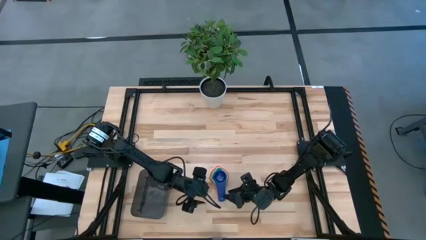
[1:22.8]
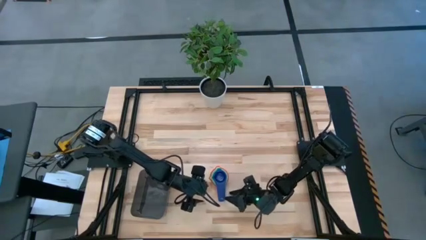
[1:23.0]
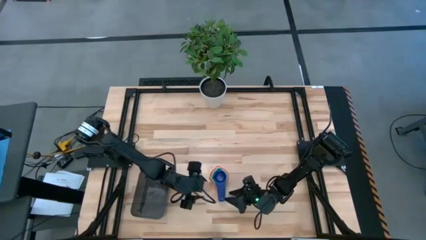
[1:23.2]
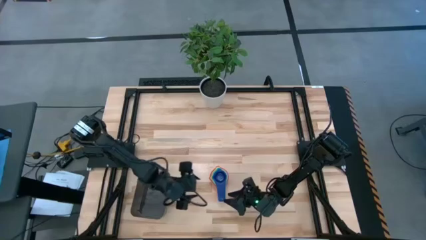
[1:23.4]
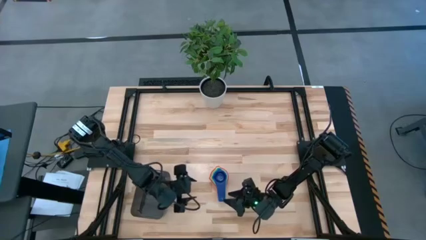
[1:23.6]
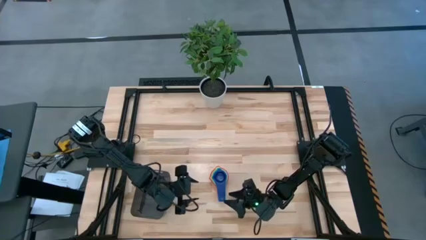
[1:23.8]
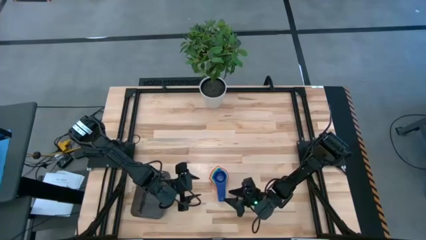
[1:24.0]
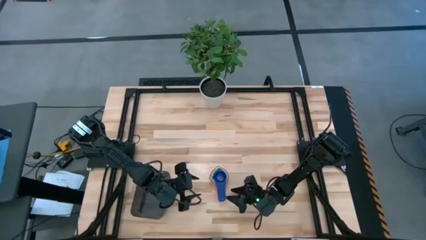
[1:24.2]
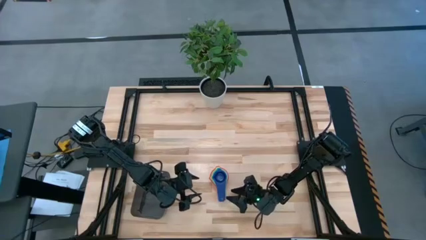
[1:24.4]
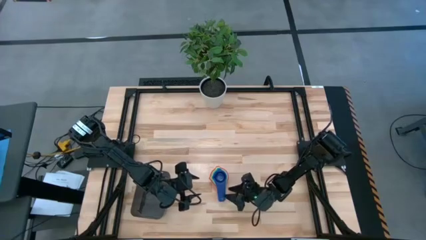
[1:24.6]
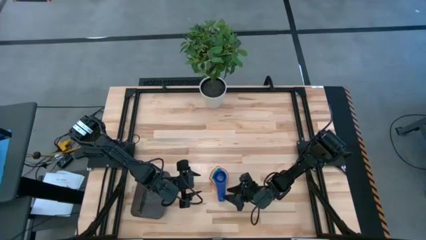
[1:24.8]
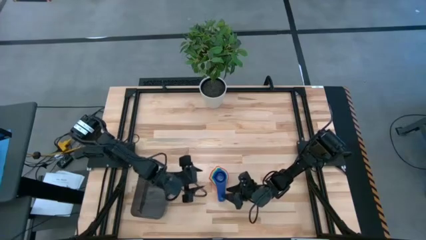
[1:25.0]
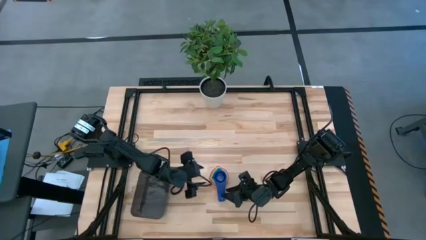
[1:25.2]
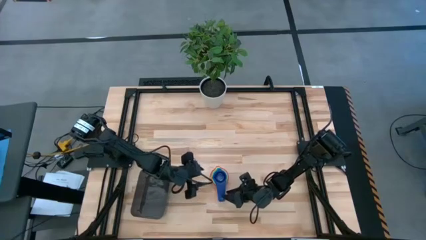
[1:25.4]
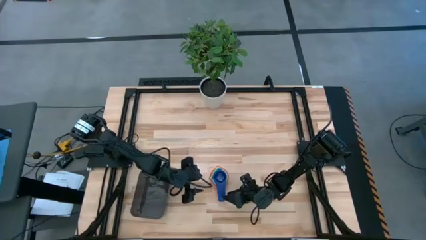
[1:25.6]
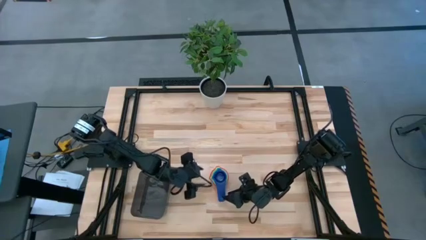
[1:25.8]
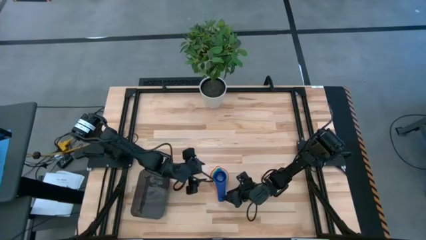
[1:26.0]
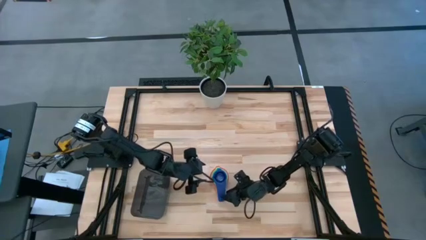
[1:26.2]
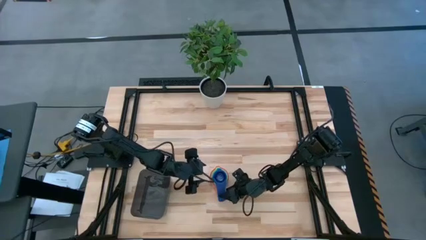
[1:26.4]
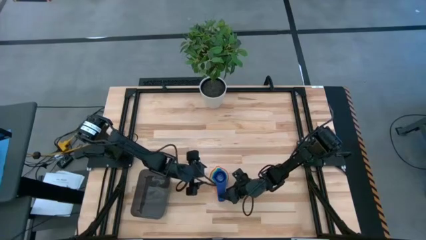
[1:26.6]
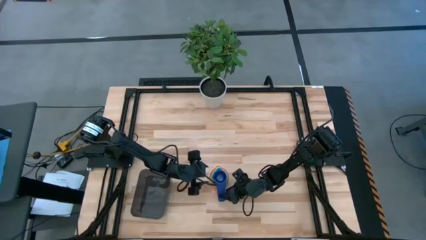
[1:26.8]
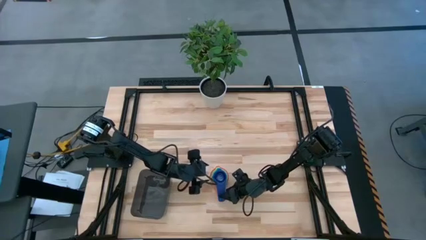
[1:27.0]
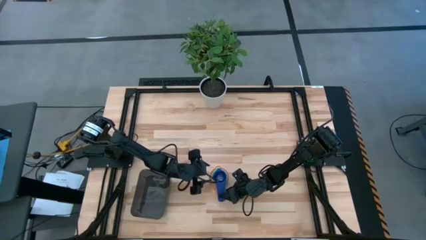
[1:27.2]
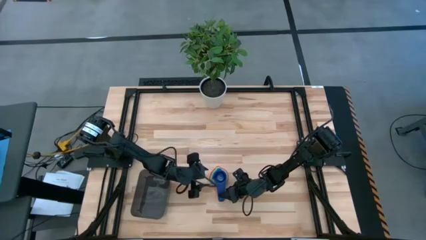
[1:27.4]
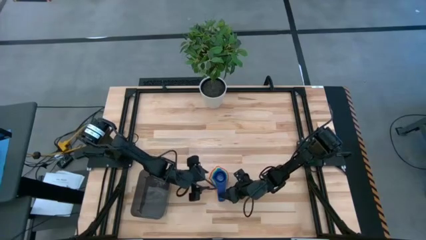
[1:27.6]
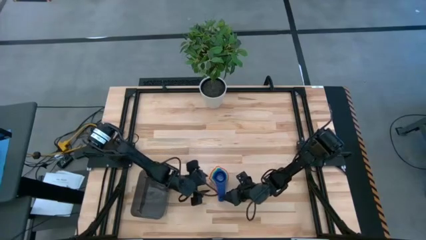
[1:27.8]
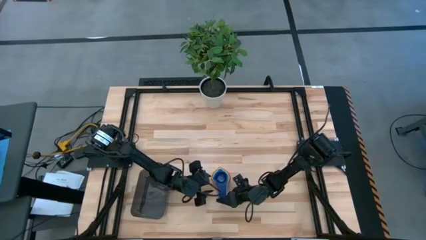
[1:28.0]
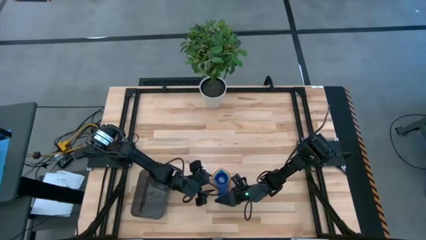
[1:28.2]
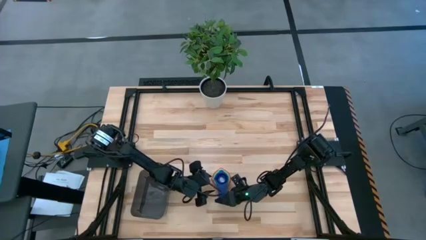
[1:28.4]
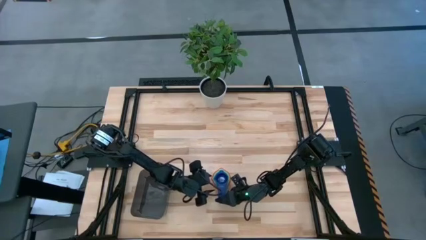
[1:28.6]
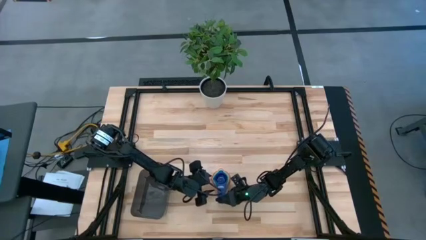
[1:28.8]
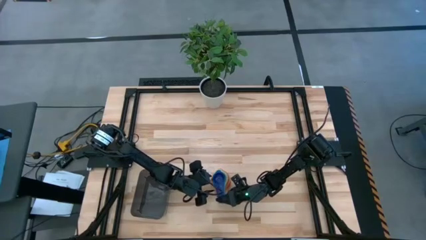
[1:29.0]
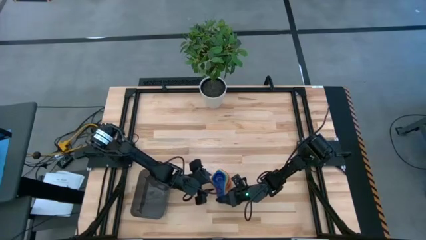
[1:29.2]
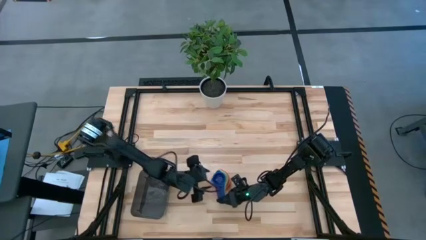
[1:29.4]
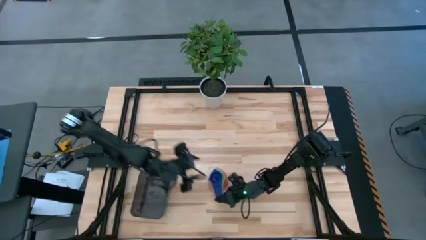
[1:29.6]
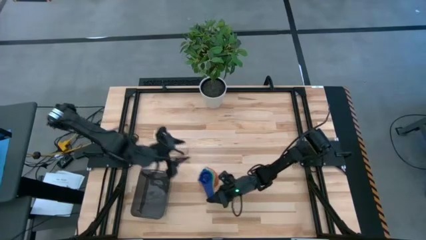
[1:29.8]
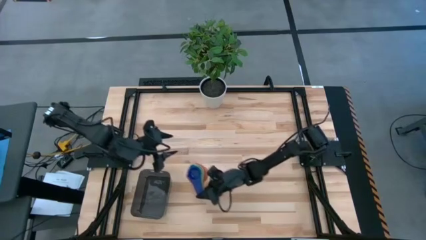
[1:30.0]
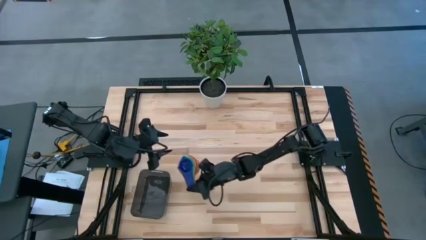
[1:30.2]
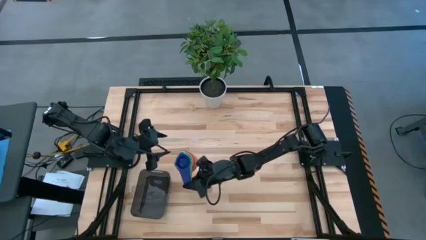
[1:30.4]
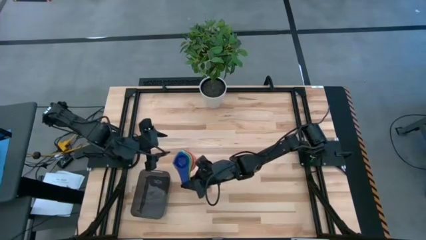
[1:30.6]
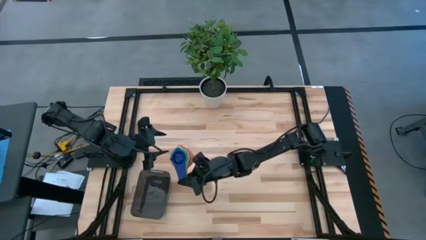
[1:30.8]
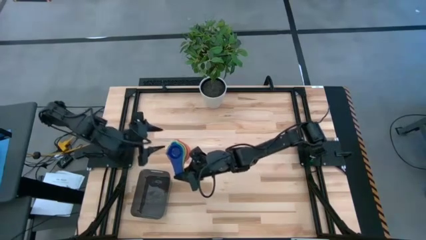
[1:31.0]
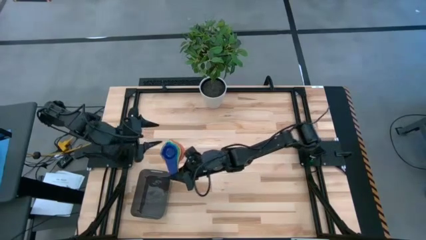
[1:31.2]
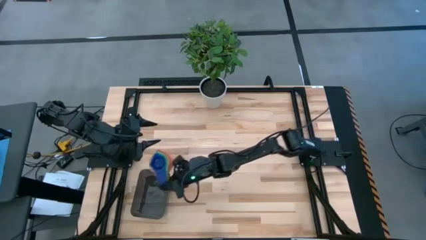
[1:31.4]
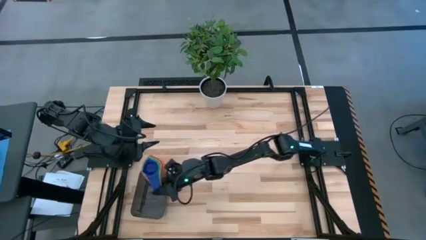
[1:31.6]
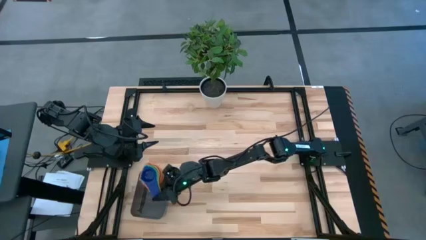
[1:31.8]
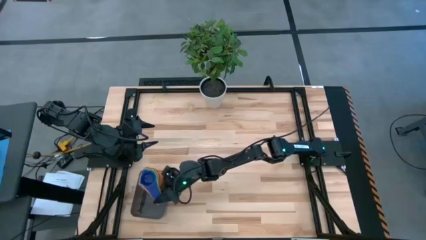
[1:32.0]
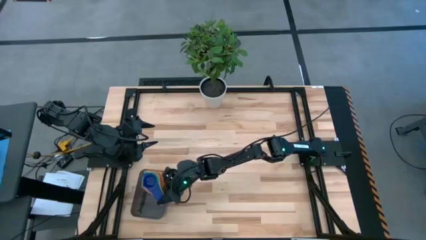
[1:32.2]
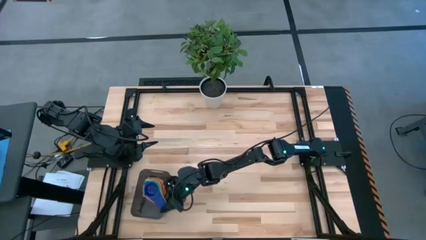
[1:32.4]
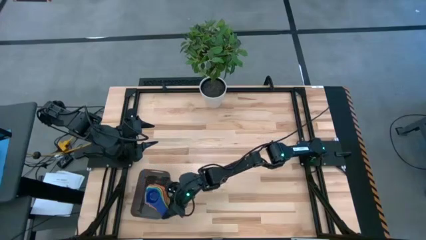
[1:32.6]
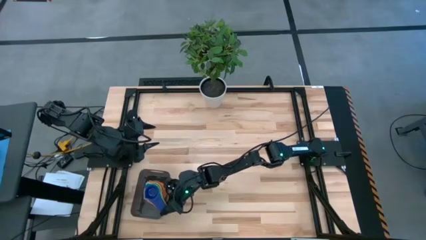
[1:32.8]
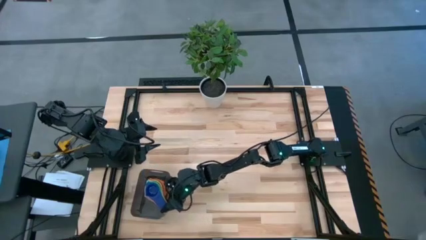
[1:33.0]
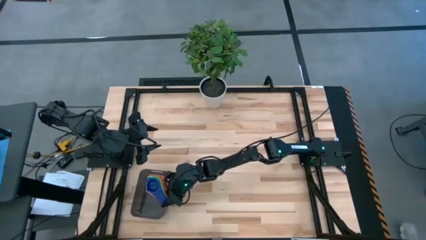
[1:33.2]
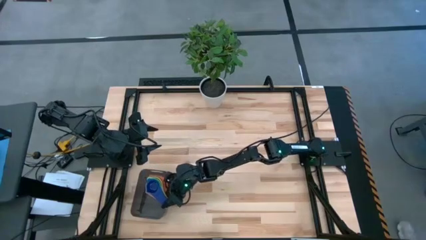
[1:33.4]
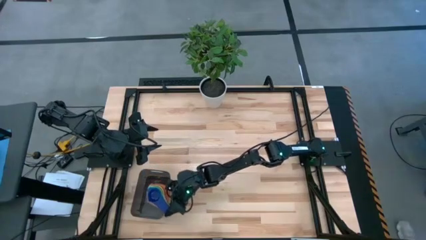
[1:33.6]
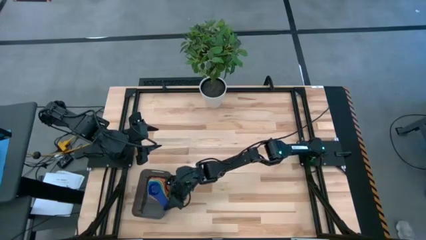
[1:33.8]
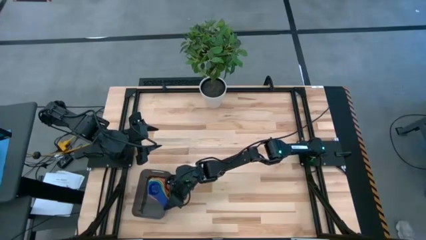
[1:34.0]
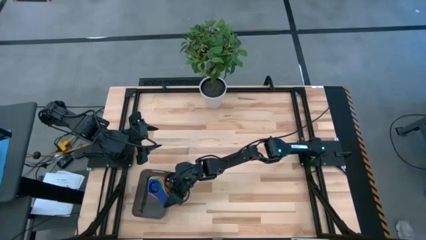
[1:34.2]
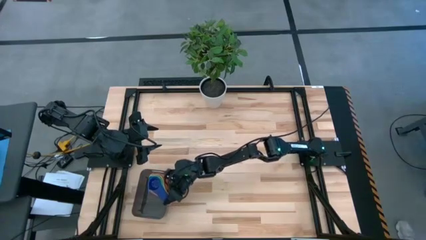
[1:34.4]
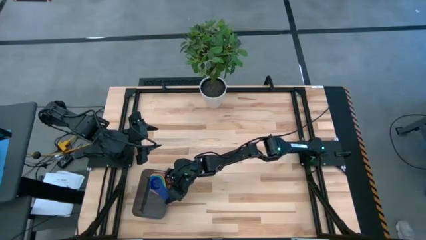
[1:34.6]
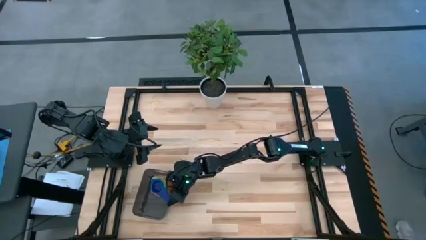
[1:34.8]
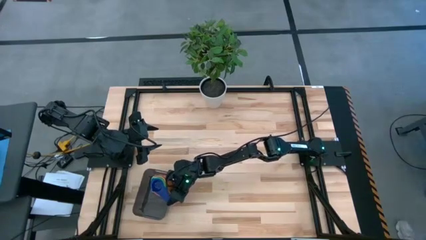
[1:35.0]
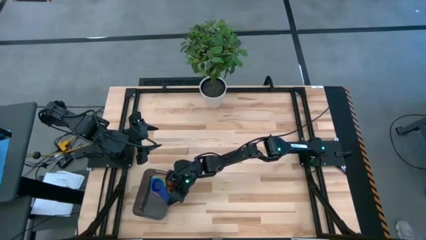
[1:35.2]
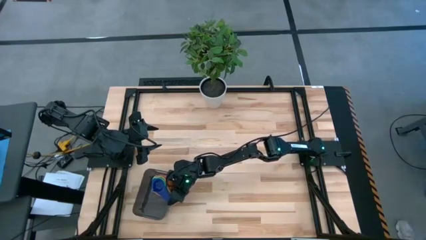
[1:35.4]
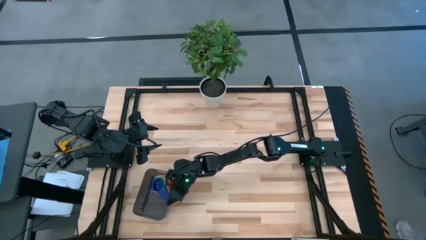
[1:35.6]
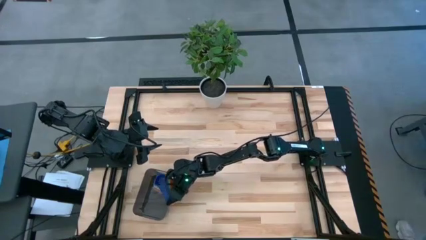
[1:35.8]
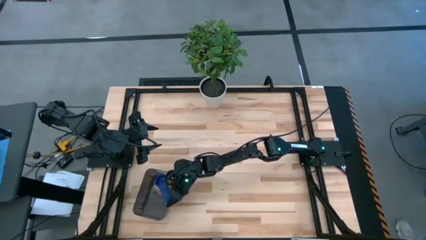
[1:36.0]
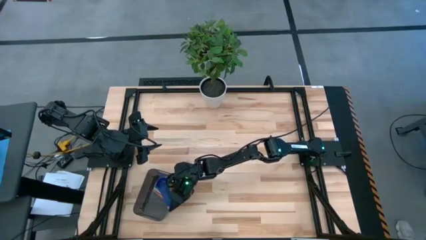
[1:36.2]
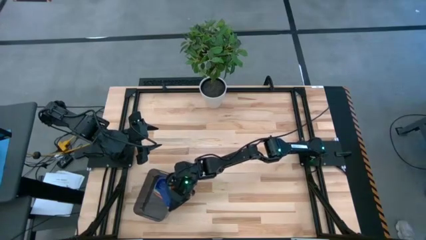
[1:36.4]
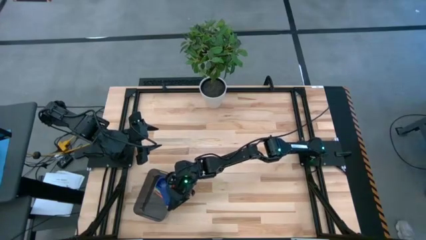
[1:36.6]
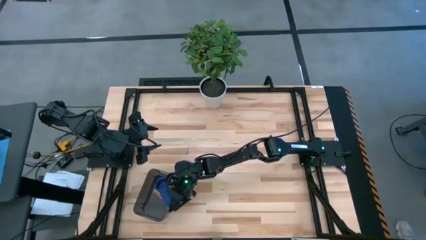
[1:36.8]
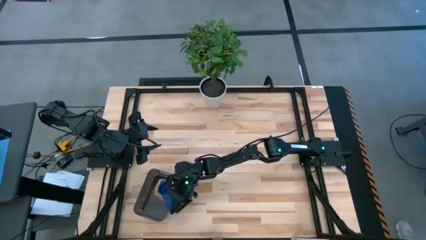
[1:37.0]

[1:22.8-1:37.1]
Task: Nest measuring cups in basket
Put the nested measuring cups into the black bin

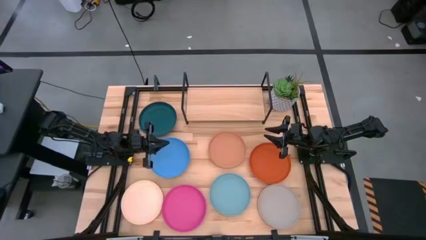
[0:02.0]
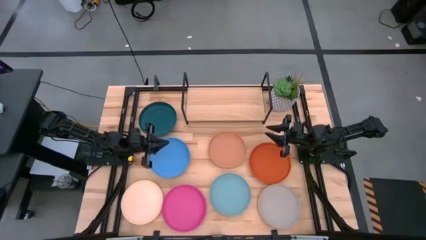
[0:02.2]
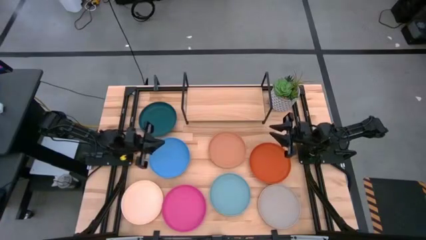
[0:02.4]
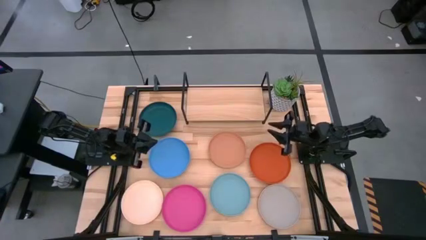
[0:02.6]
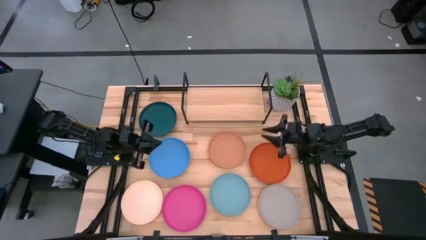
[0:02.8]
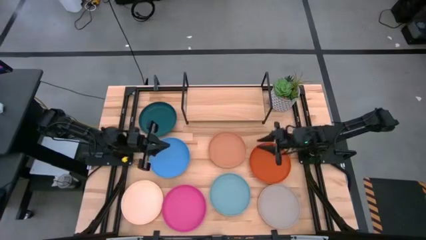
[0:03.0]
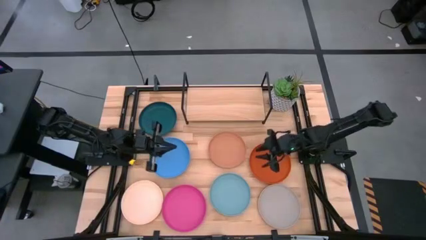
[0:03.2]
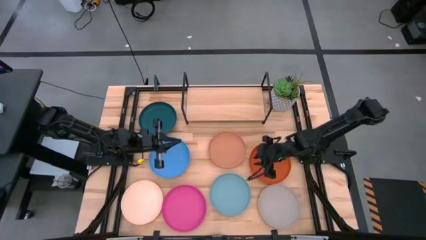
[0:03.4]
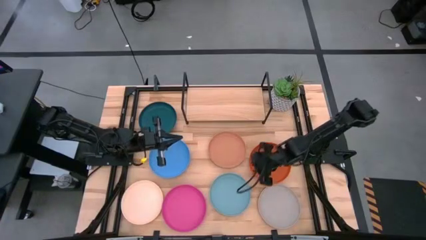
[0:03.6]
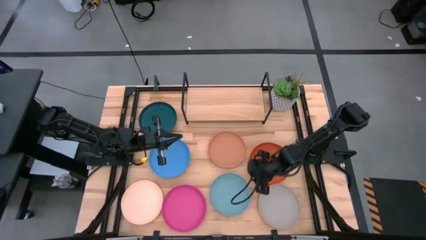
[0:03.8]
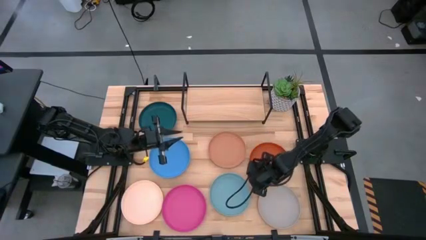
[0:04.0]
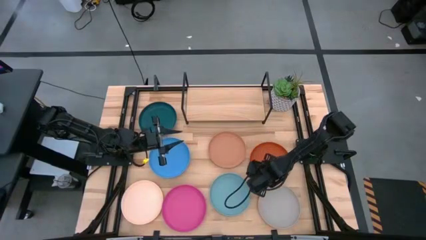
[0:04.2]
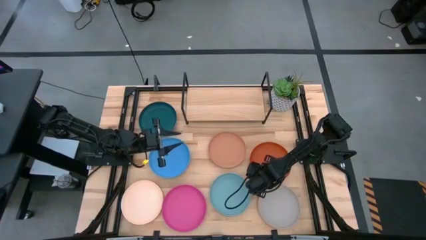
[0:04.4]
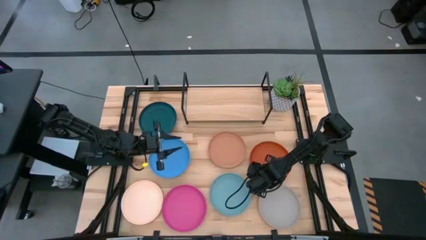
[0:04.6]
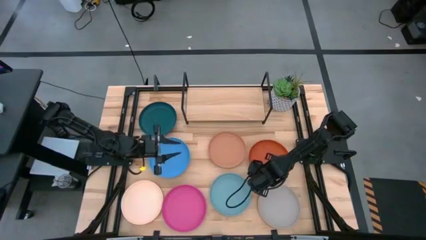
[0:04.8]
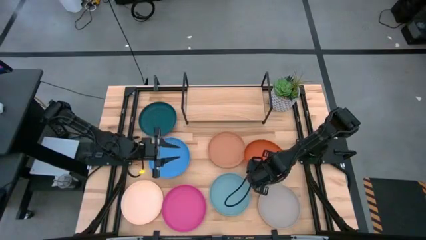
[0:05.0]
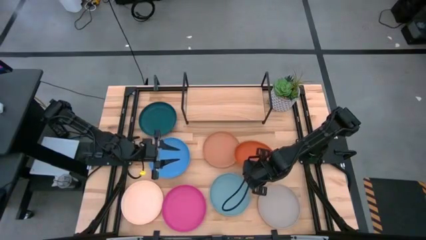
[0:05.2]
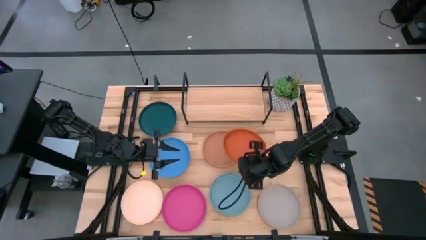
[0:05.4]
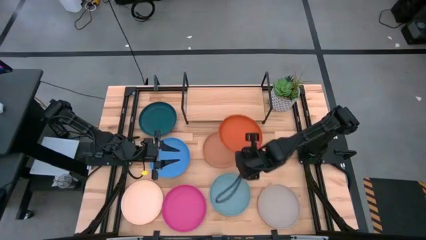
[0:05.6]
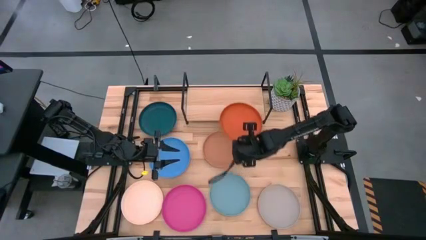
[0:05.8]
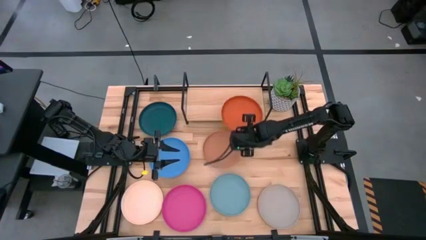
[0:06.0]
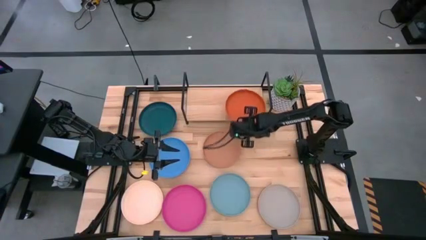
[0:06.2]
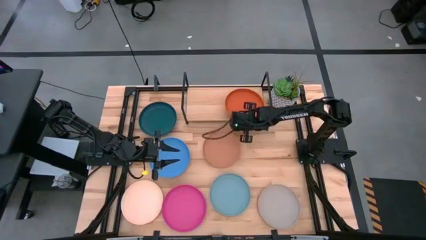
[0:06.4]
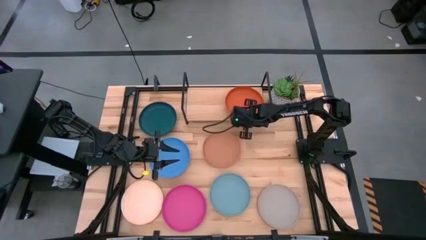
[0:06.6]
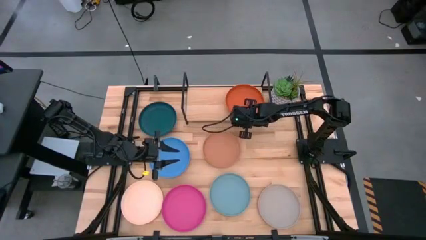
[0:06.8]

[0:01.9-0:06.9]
Task: Place and stack plates onto a shelf
Put the orange plate on the shelf
